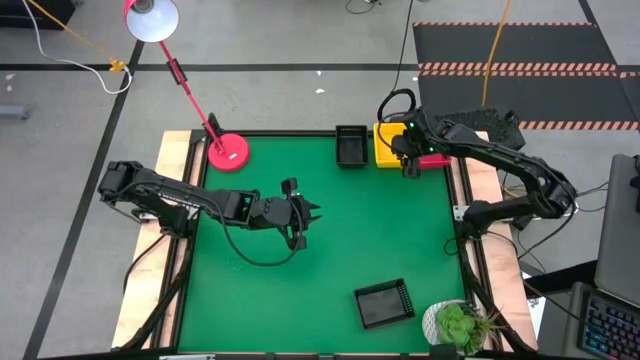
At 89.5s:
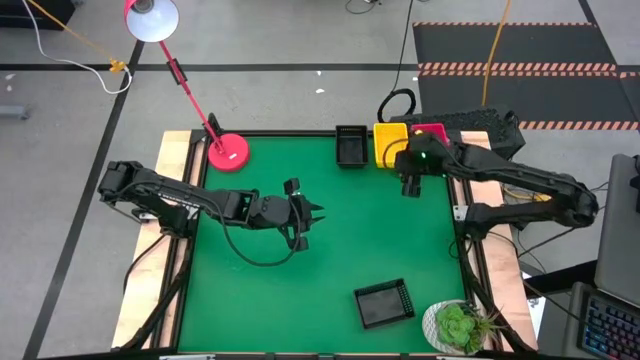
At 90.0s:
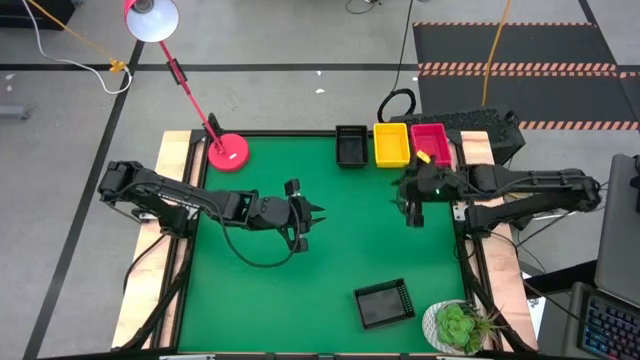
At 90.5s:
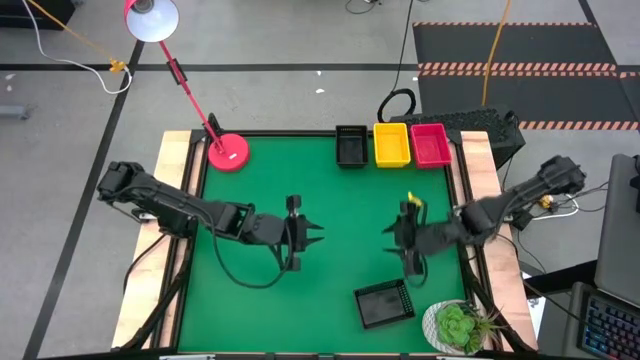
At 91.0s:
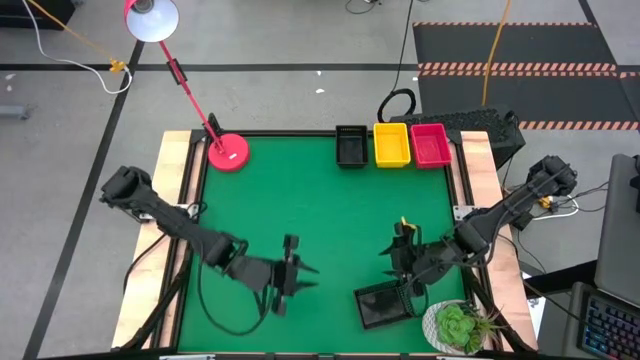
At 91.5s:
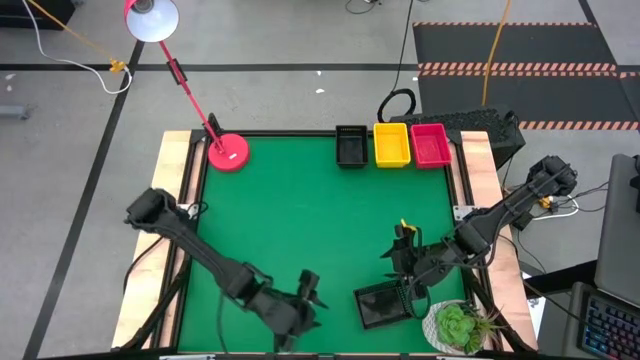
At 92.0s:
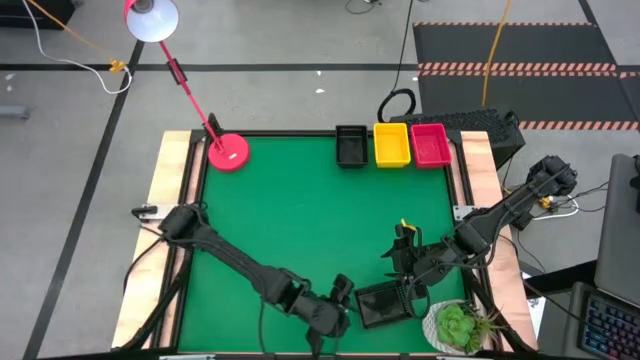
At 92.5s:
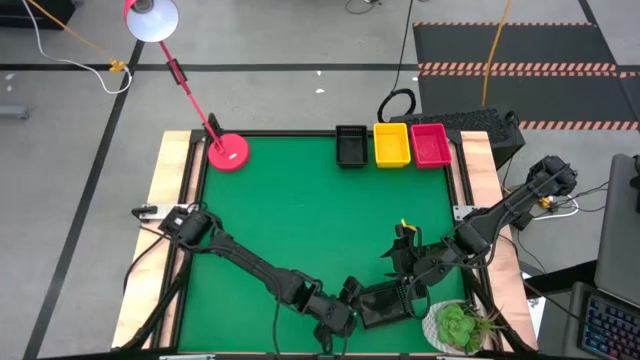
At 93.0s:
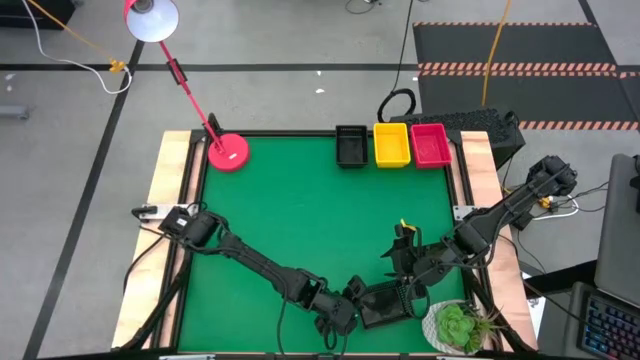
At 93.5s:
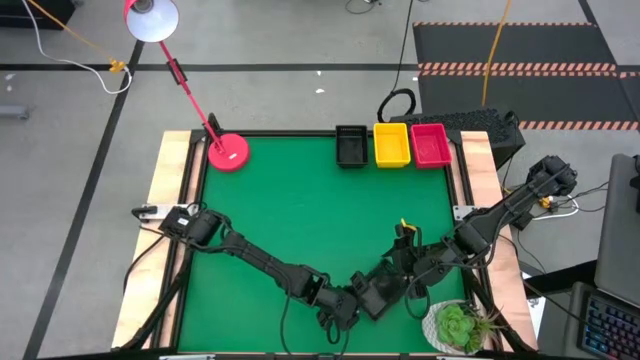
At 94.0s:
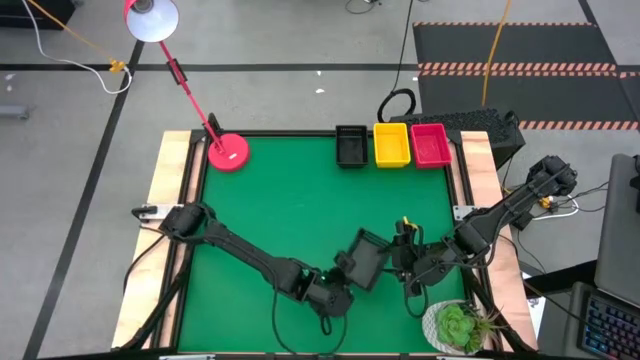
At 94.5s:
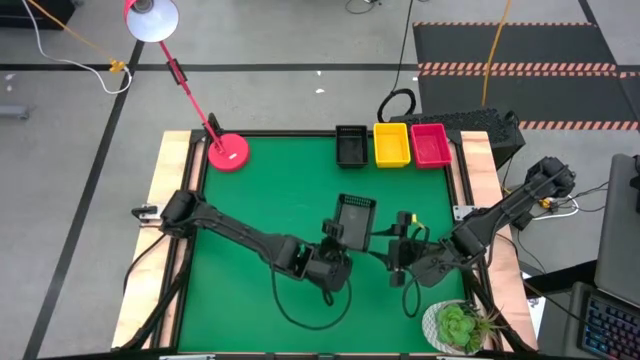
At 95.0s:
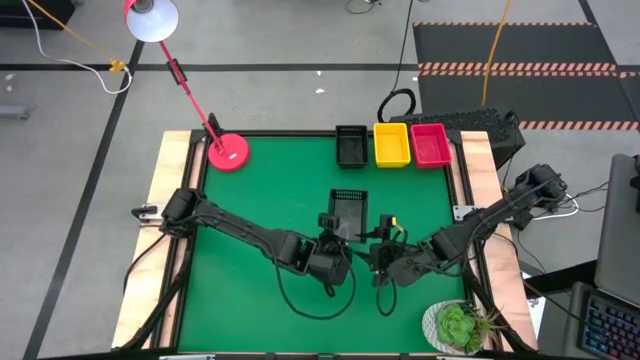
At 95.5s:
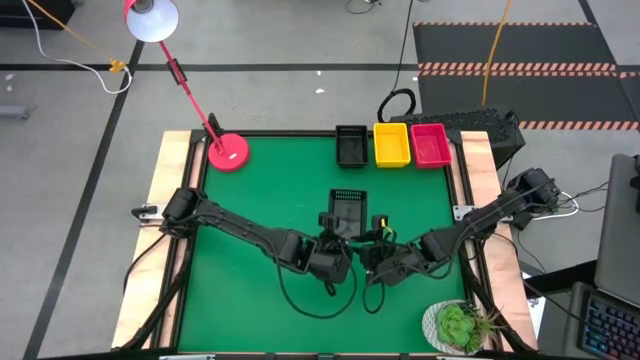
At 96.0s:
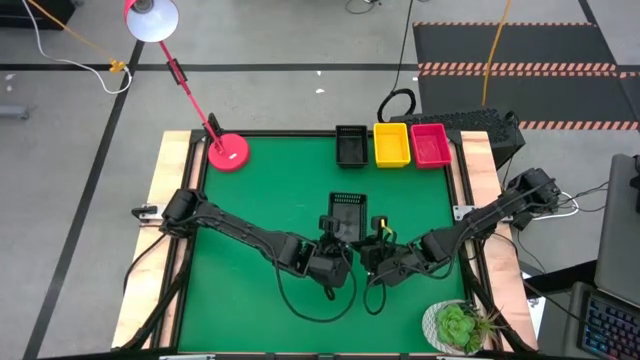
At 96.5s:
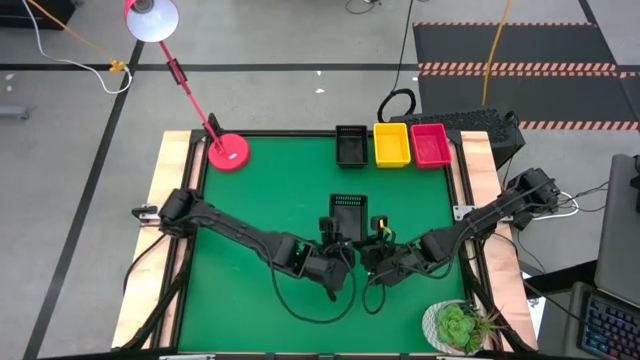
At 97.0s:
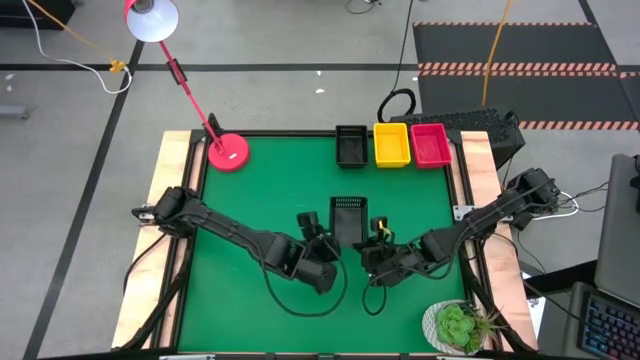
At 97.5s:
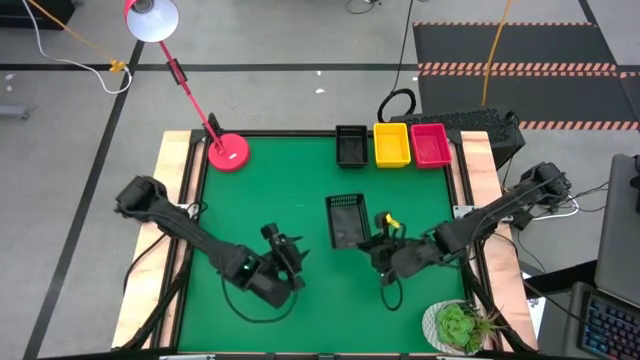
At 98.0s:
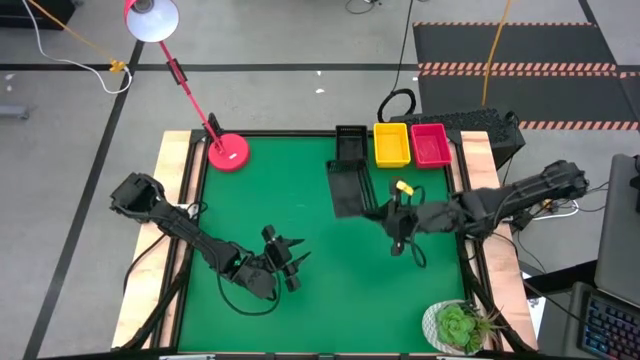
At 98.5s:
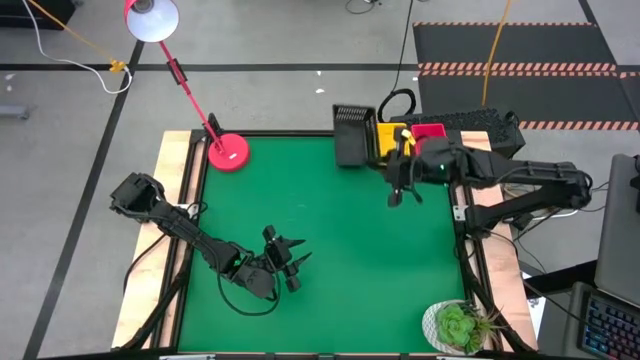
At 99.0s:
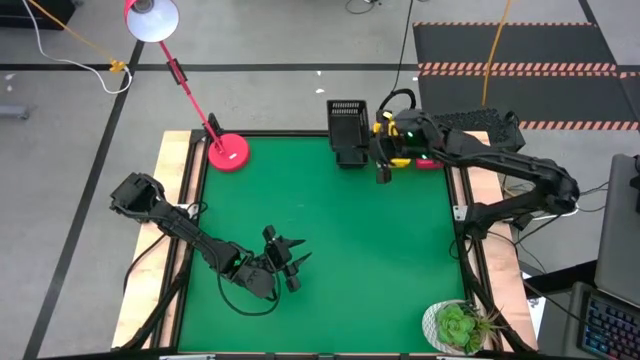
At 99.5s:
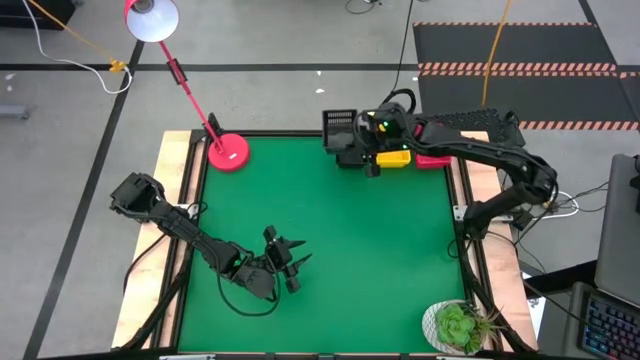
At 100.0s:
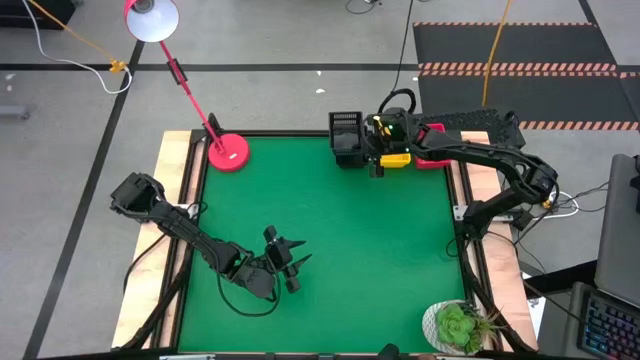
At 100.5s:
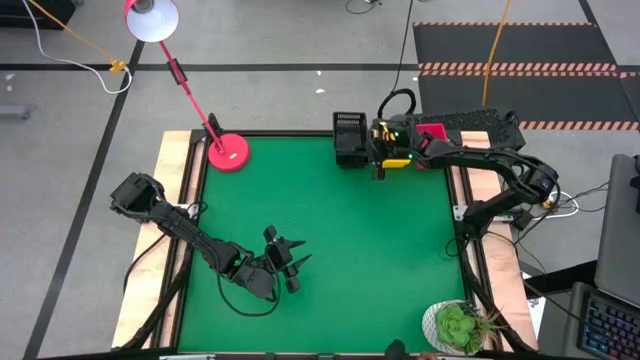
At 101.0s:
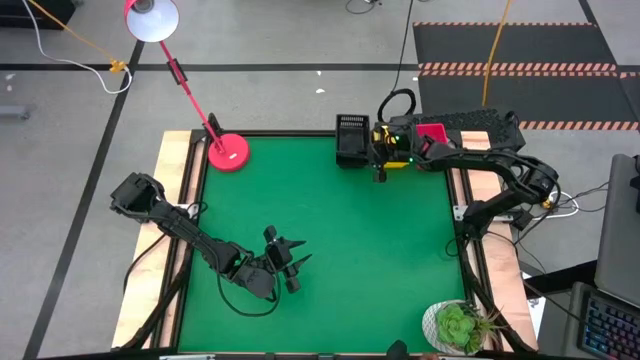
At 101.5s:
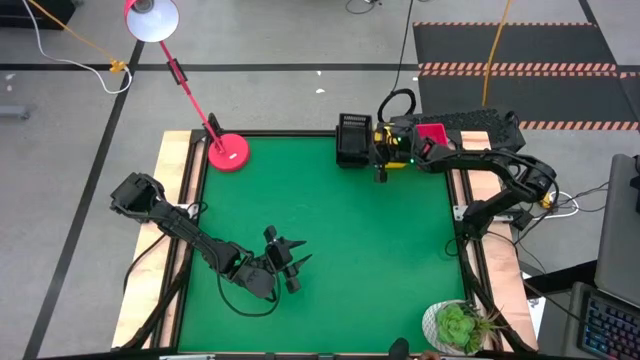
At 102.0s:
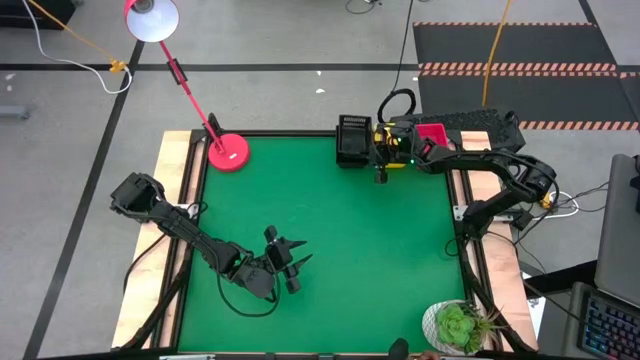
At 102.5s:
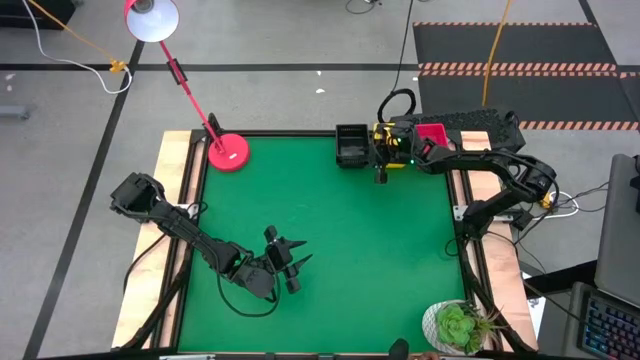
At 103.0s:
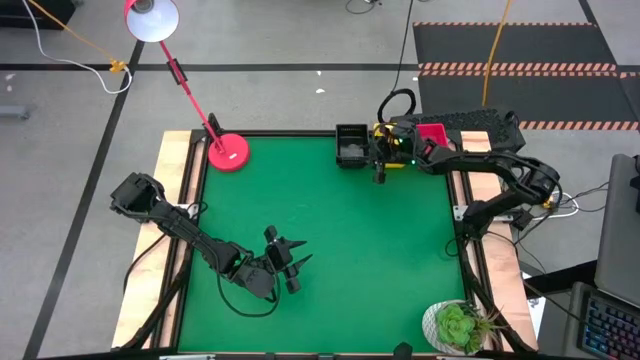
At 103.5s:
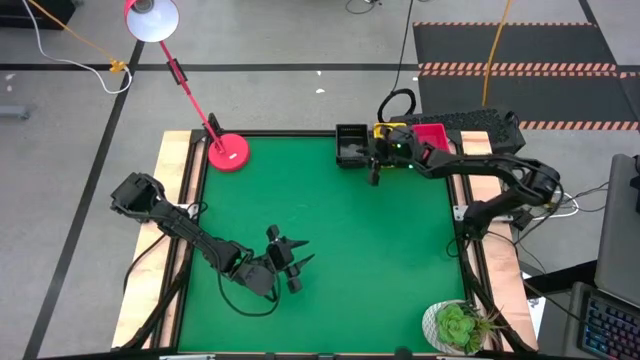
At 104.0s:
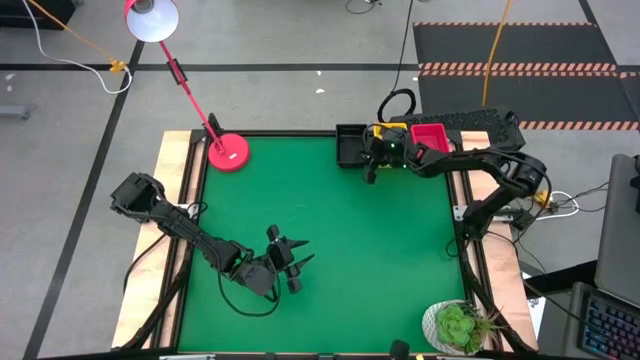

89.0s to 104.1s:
Stack the bottom black bin on the top stacked black bins
